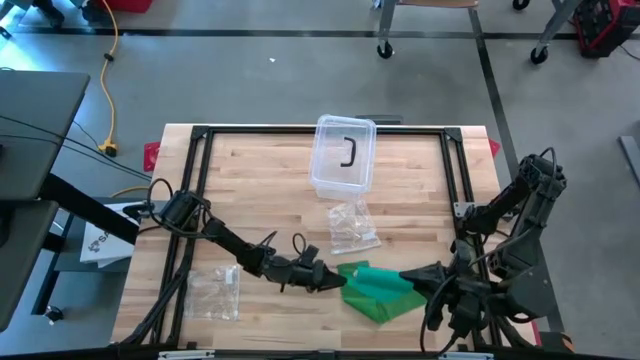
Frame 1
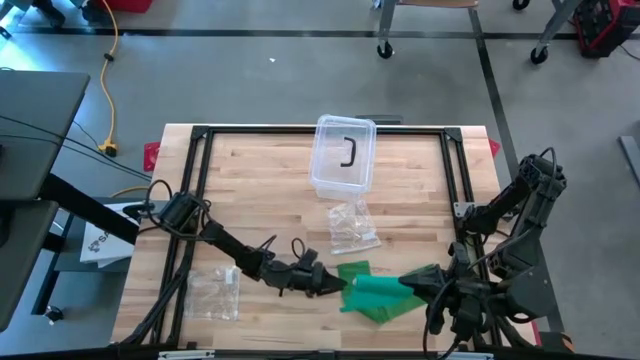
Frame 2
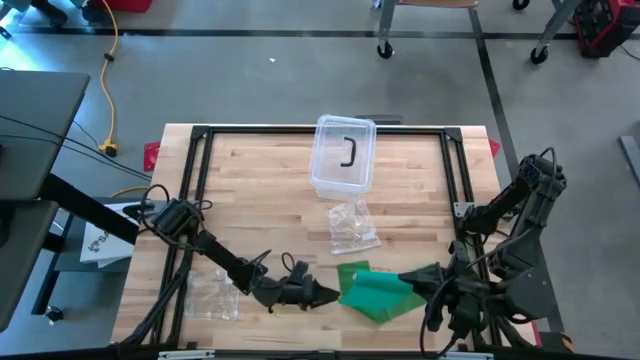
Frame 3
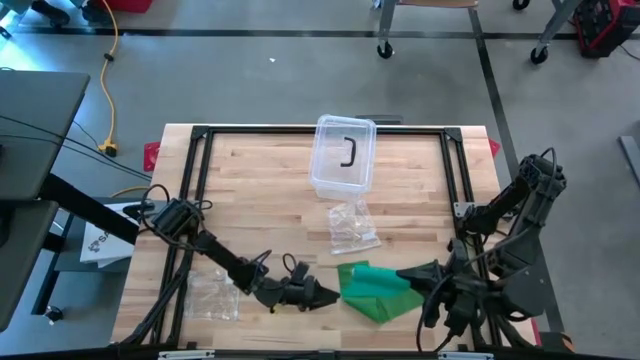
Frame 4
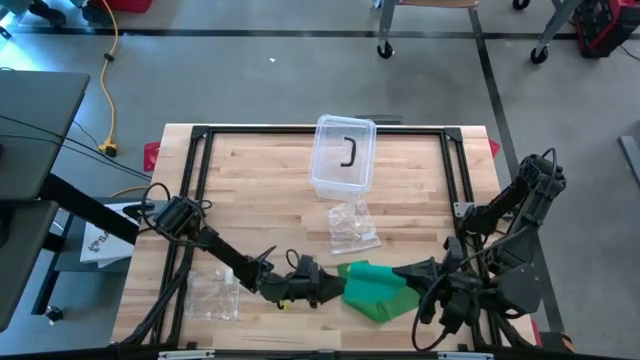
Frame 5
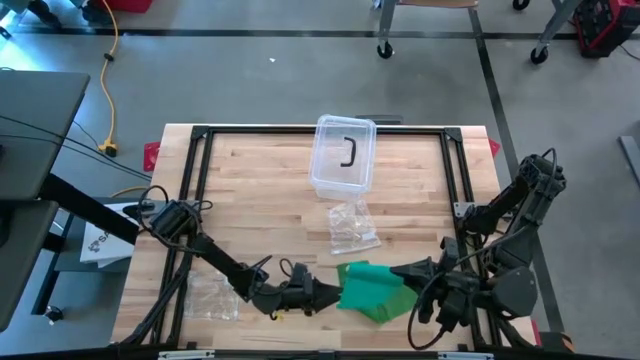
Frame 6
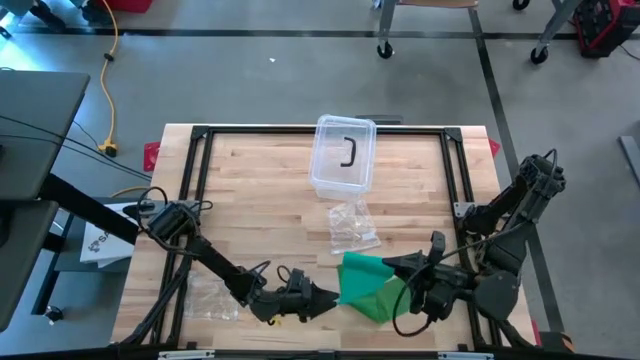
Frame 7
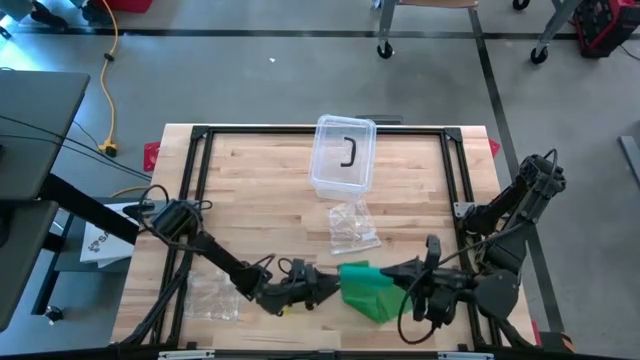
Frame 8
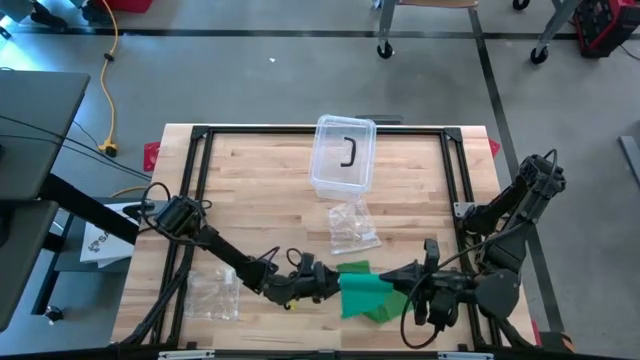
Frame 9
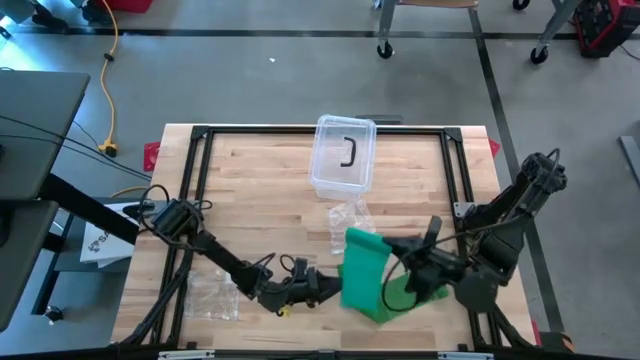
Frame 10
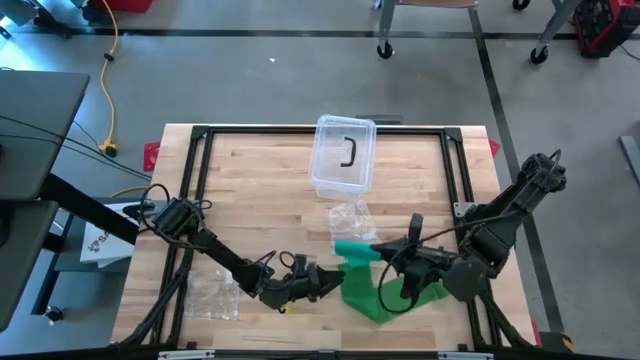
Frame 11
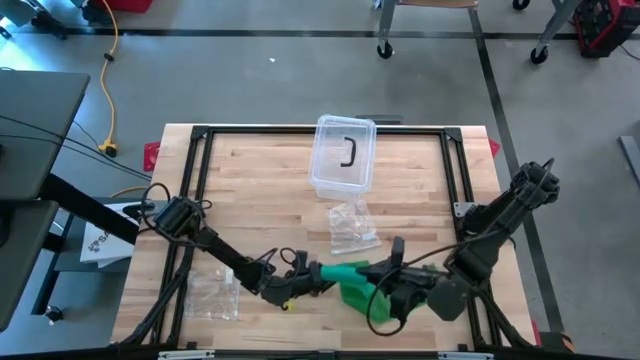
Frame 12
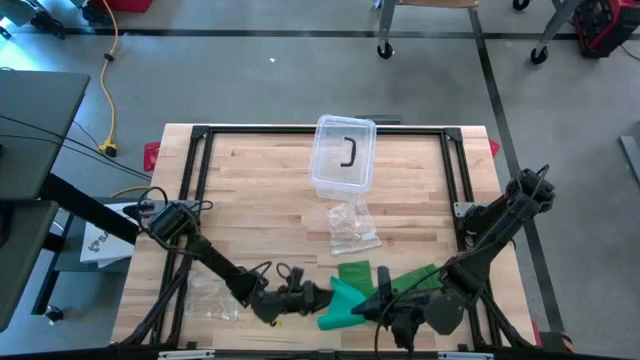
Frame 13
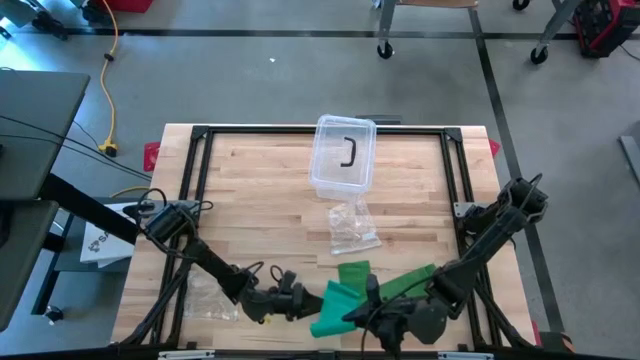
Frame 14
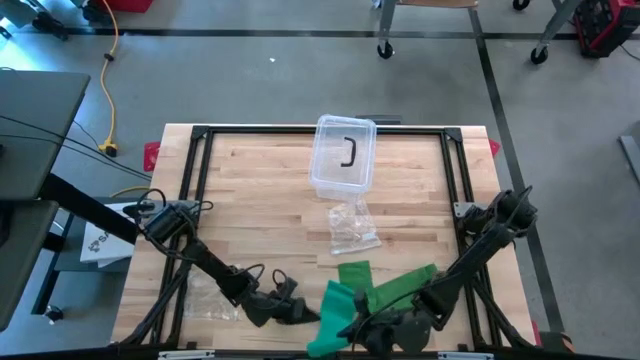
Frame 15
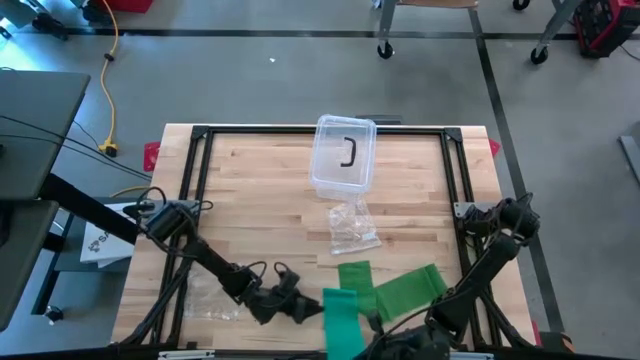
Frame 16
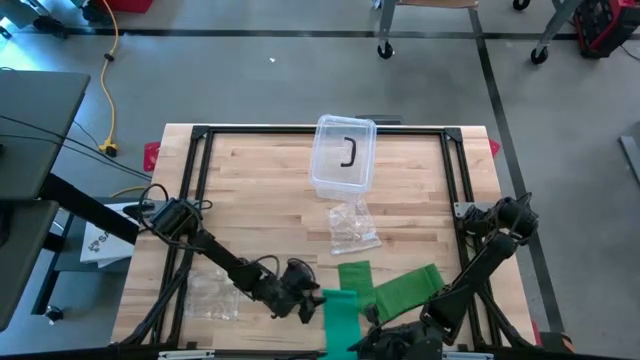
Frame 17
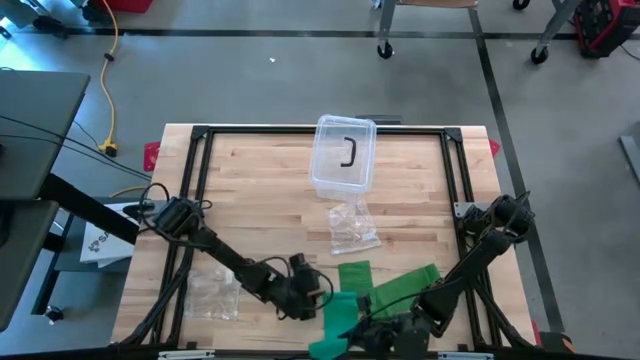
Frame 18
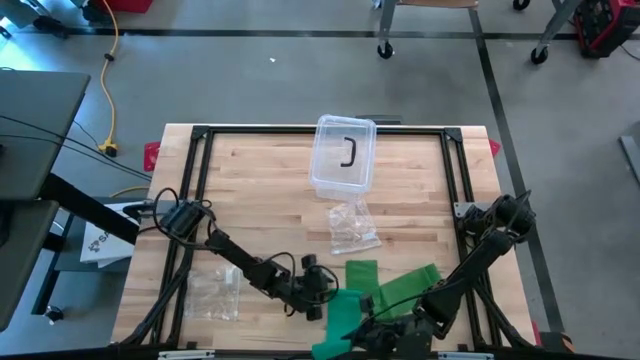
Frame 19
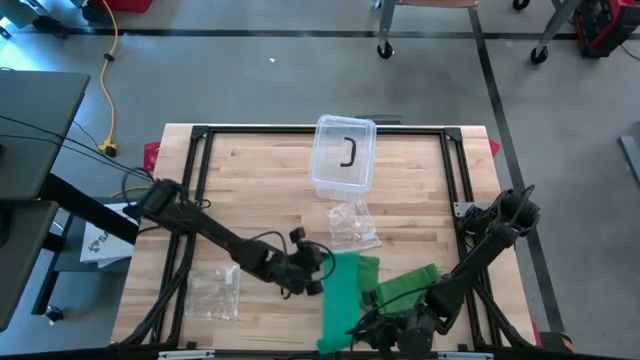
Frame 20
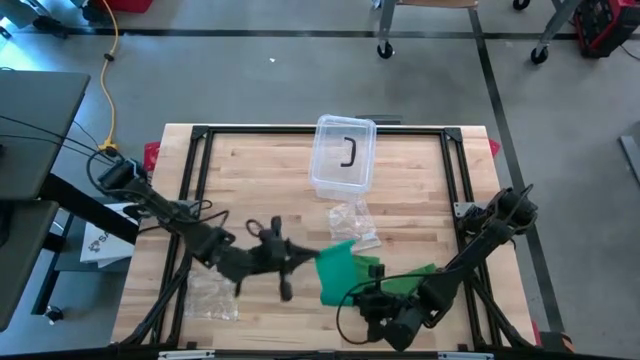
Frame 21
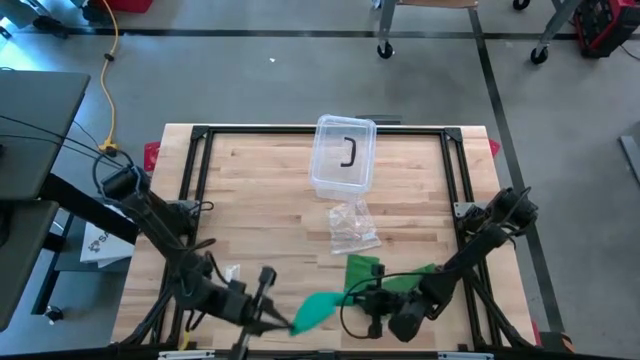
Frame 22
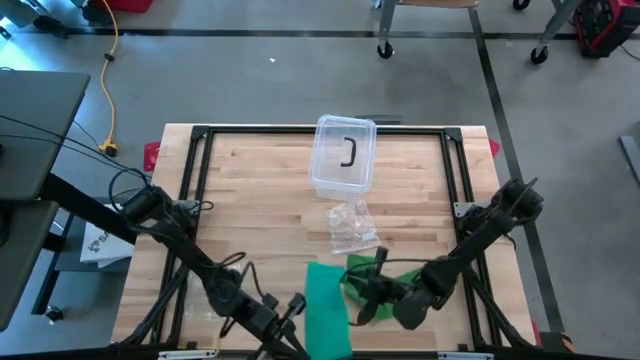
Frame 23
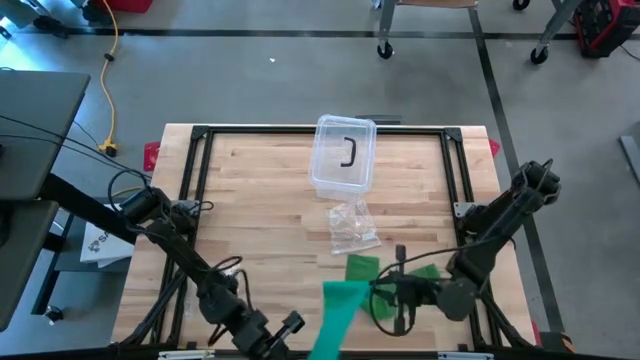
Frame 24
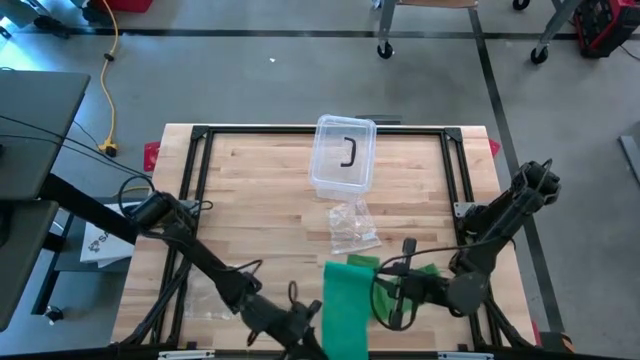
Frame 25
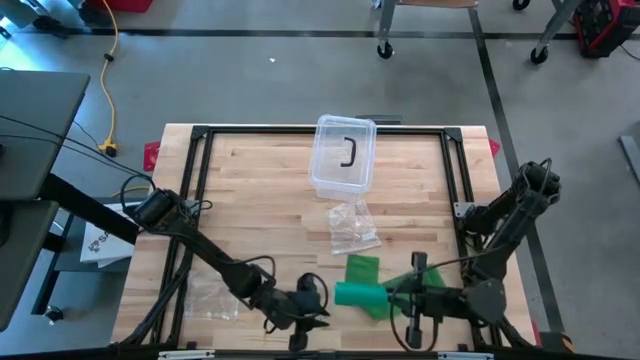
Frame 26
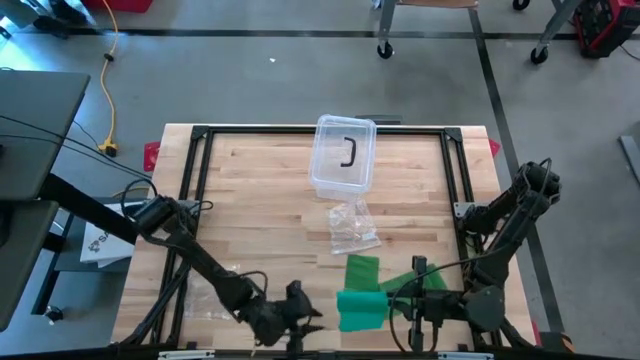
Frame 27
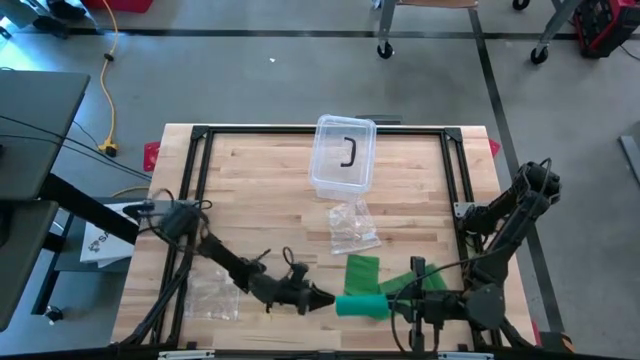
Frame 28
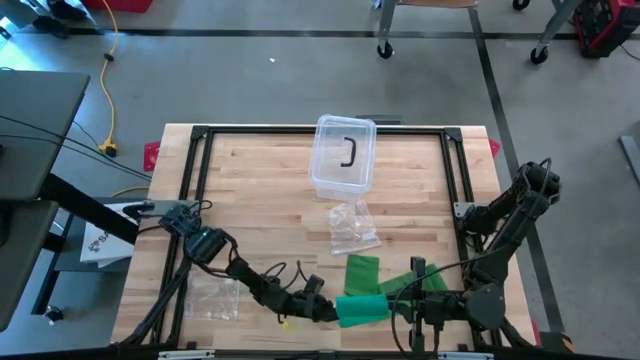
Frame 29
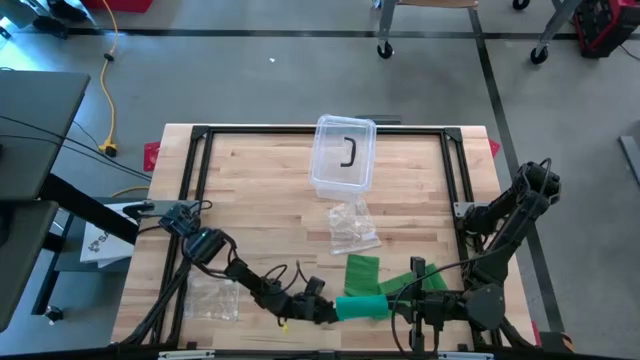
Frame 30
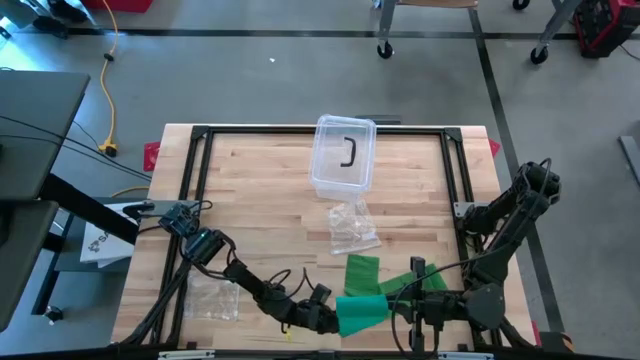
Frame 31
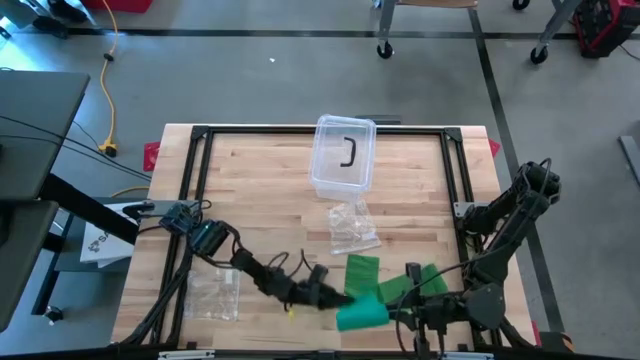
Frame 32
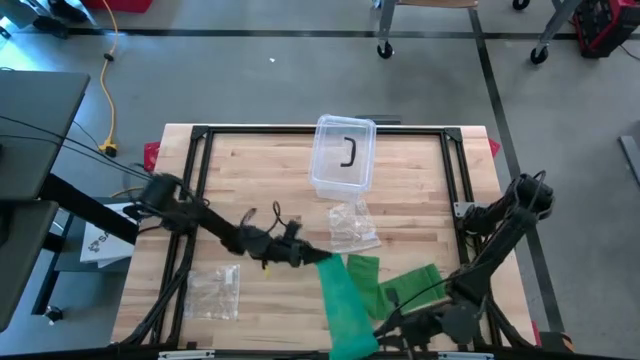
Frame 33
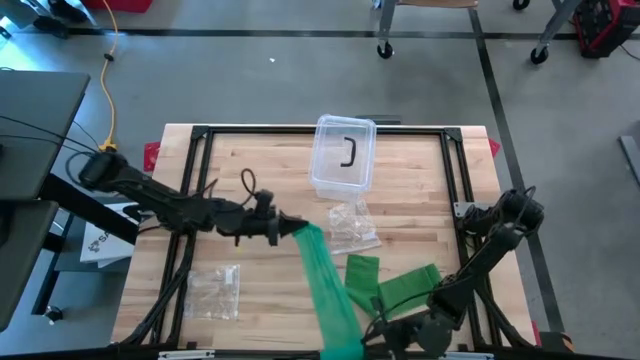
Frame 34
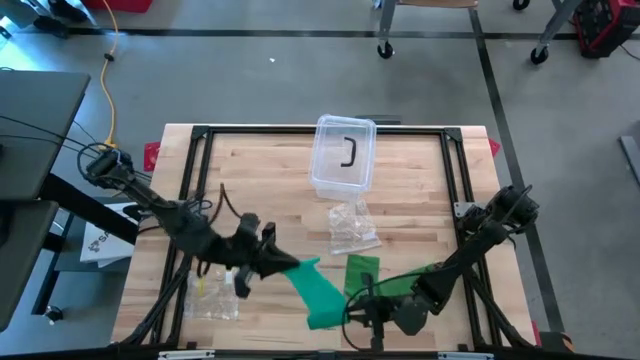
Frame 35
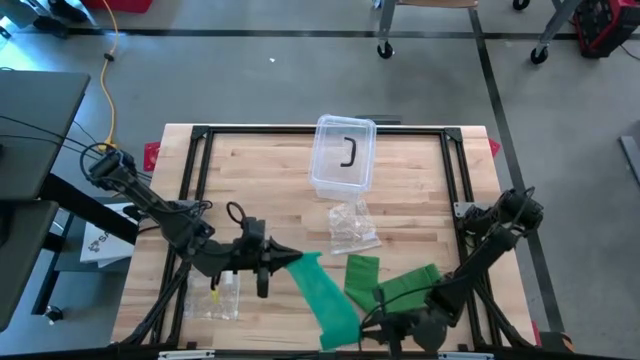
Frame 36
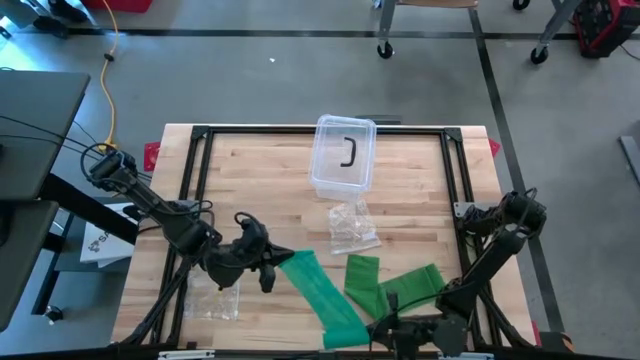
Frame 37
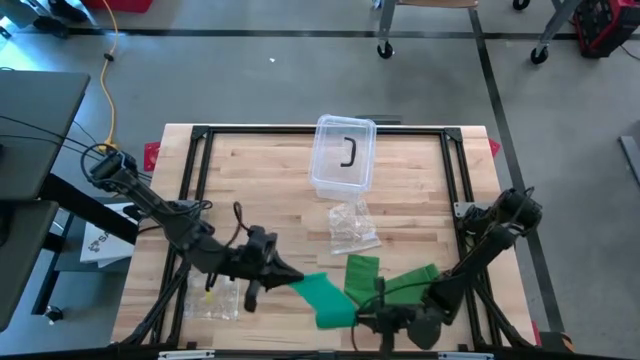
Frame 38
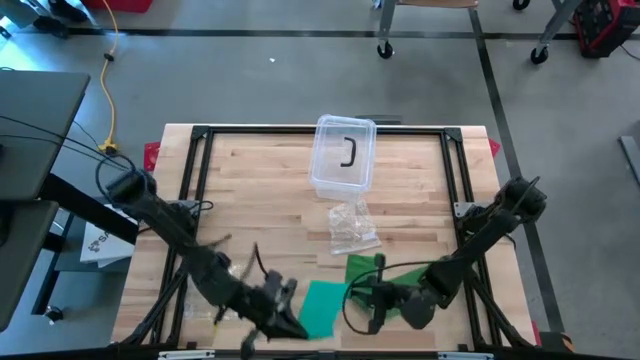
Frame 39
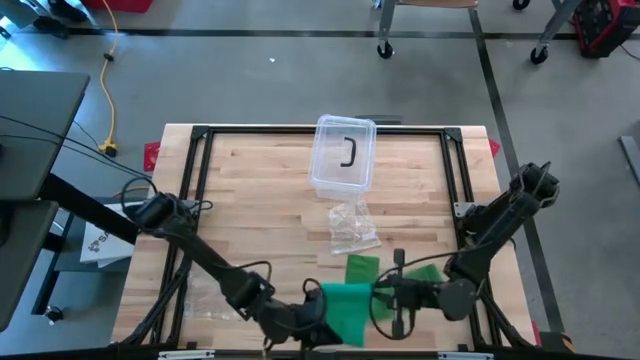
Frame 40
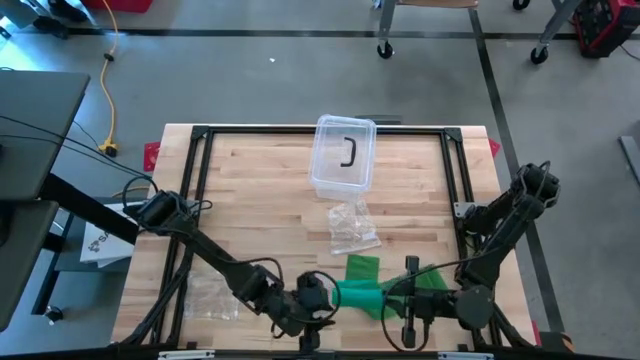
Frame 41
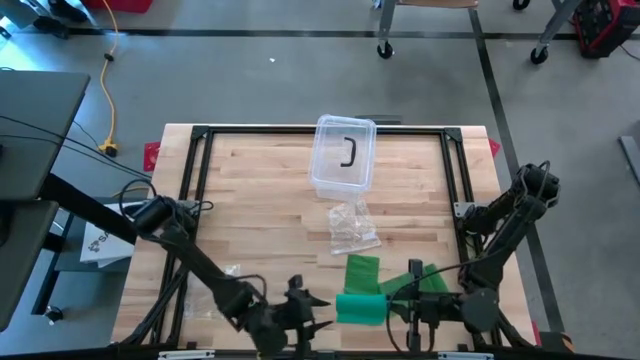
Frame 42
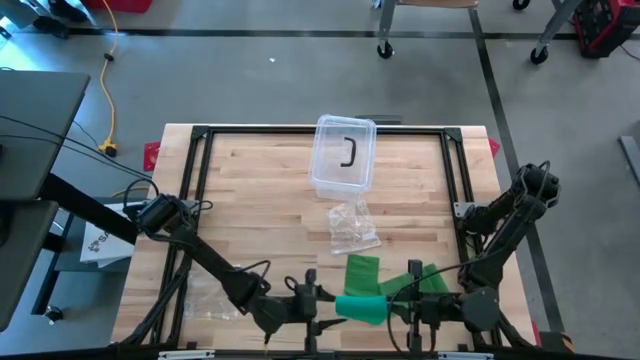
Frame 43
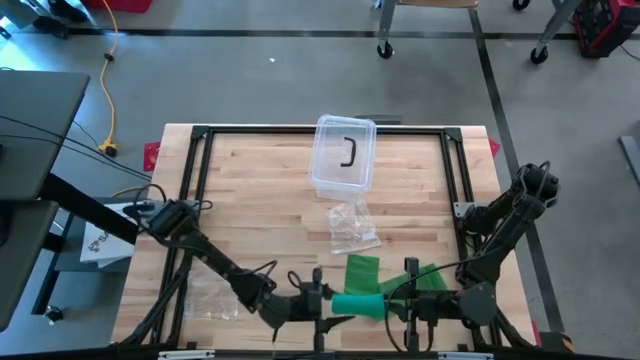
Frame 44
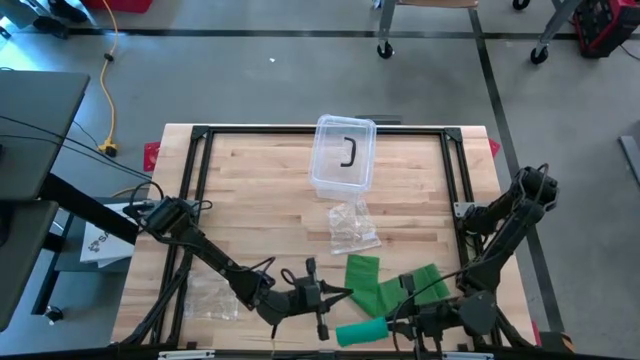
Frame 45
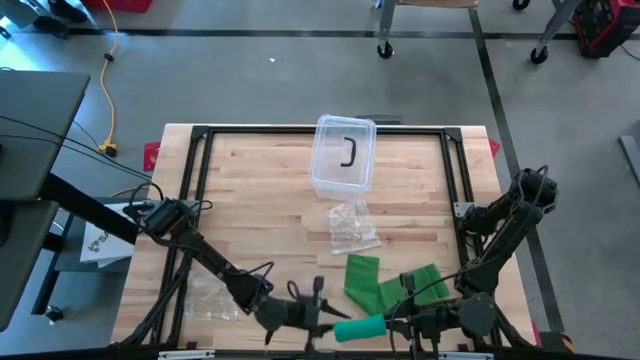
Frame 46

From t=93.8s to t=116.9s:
Task: Roll bandage
Roll the blue bandage
